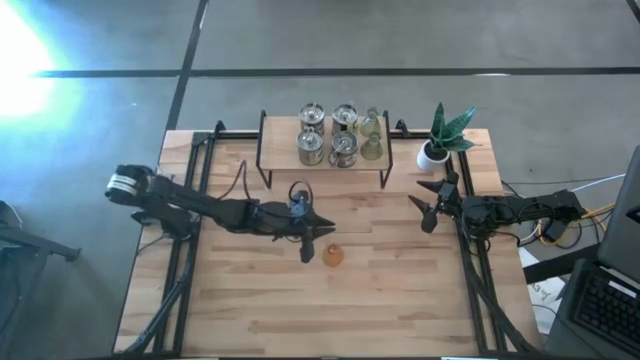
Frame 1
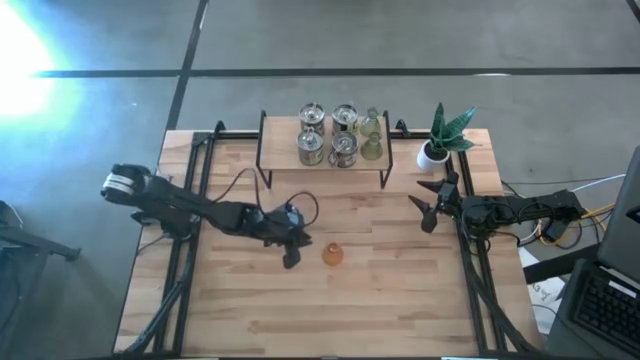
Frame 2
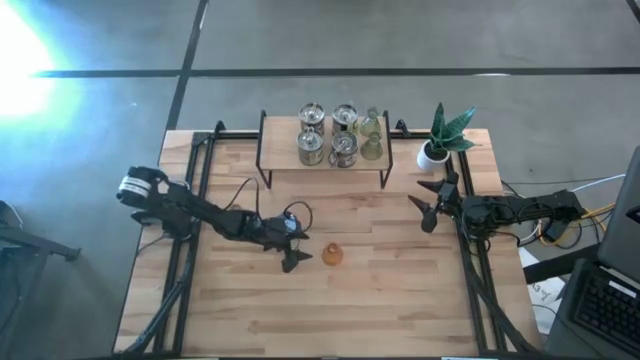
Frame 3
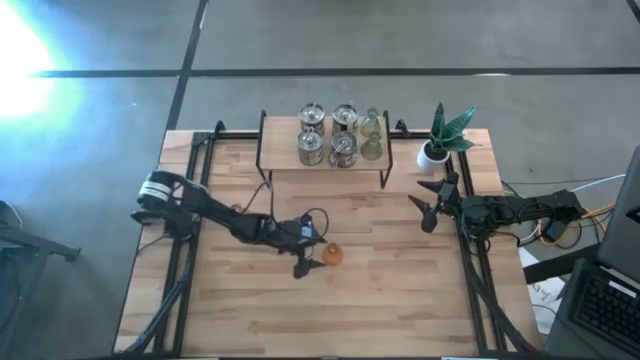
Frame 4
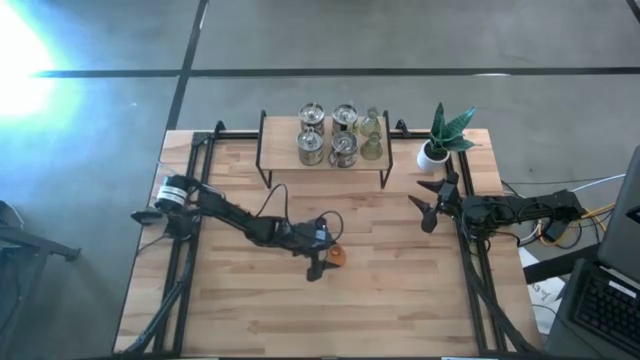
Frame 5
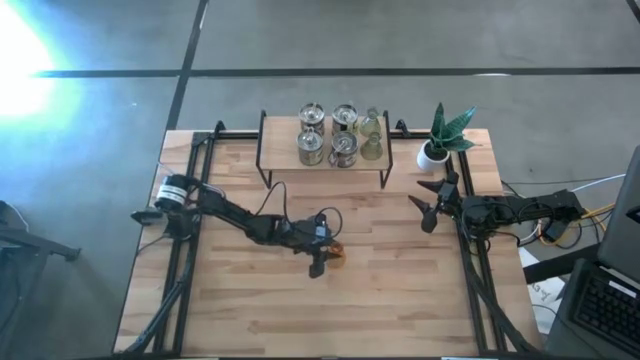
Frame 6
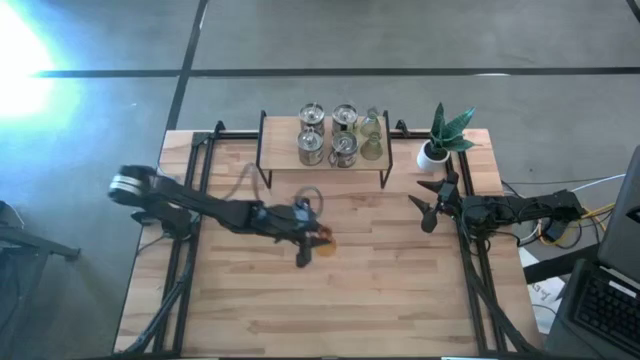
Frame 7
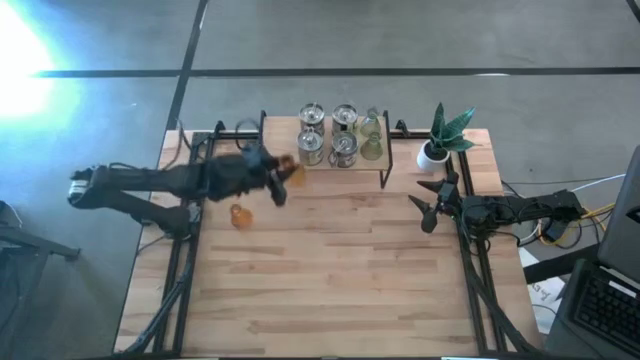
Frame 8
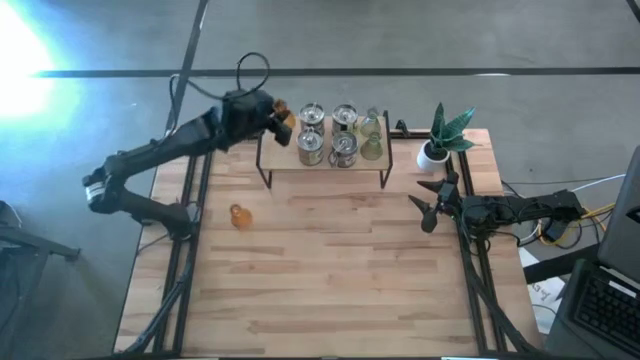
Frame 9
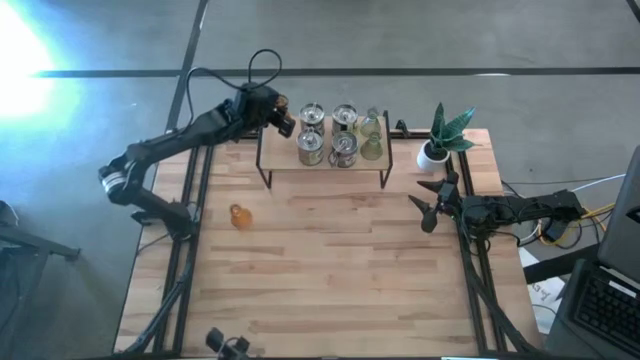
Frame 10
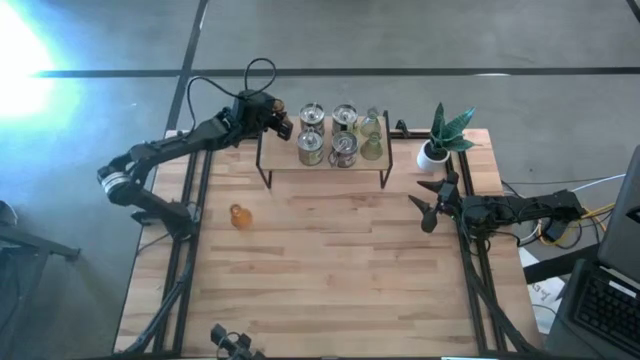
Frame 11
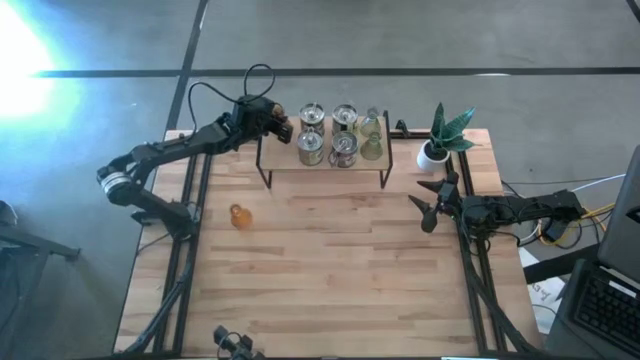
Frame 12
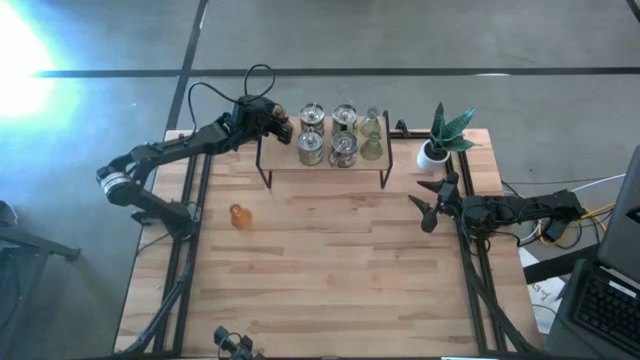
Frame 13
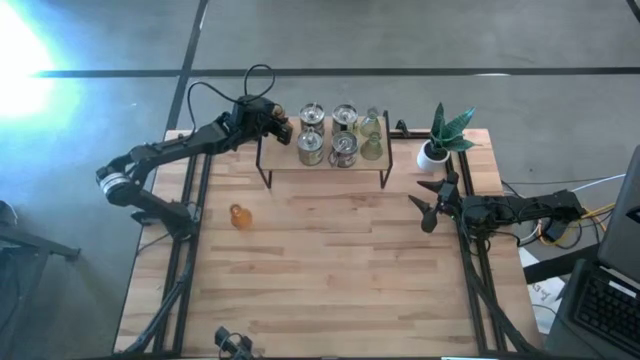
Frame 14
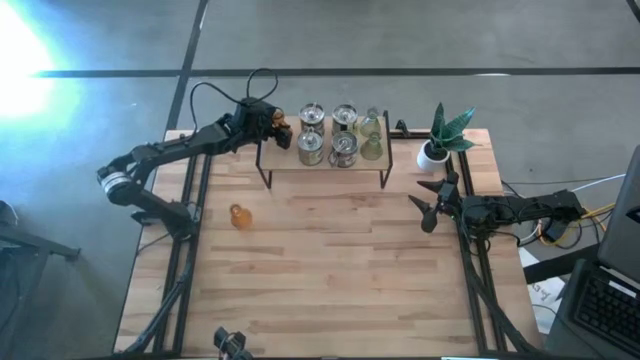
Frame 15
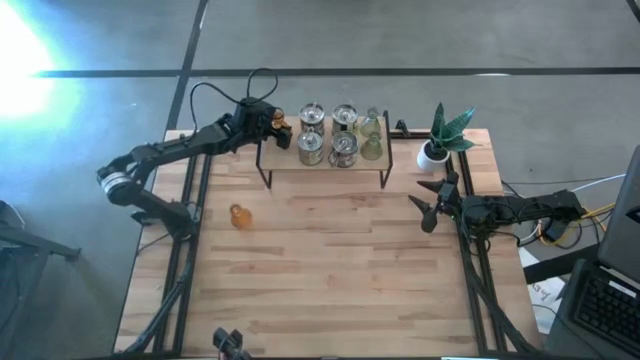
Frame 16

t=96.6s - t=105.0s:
Task: Pick & Place candle stick holders
Put the right orange candle holder on the shelf

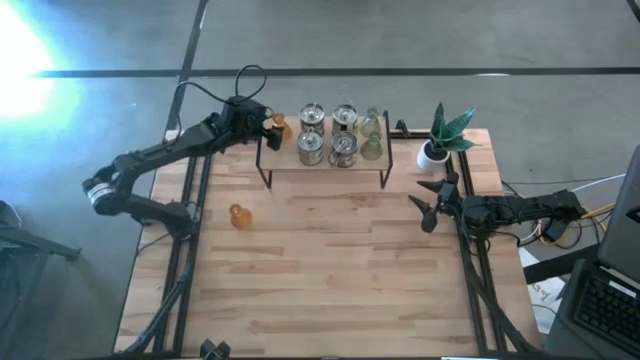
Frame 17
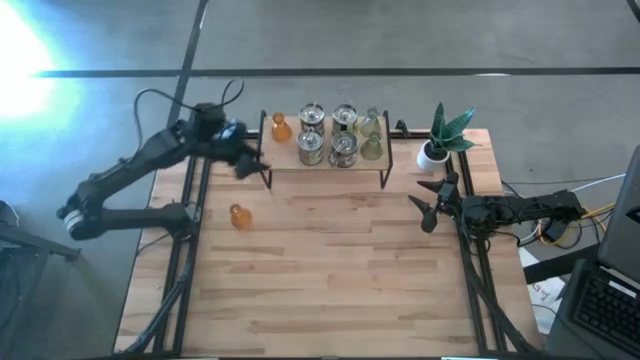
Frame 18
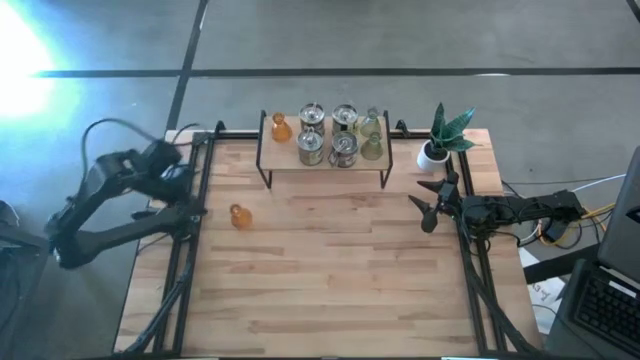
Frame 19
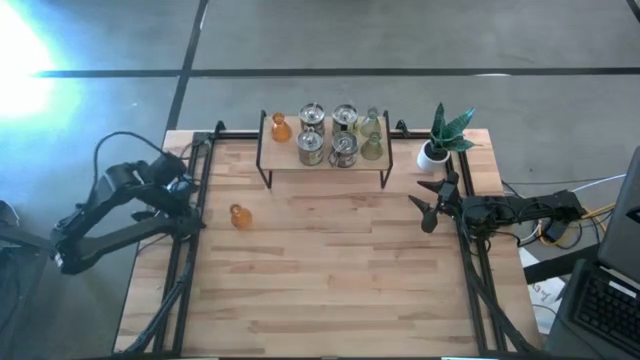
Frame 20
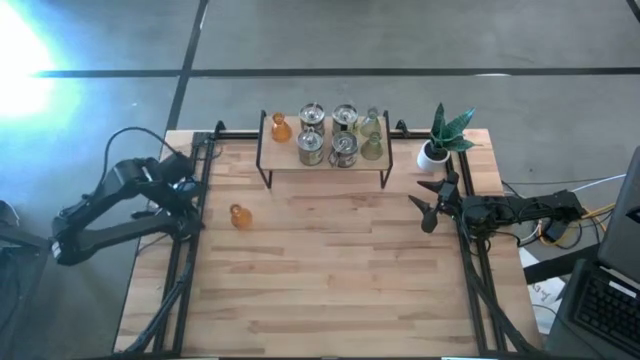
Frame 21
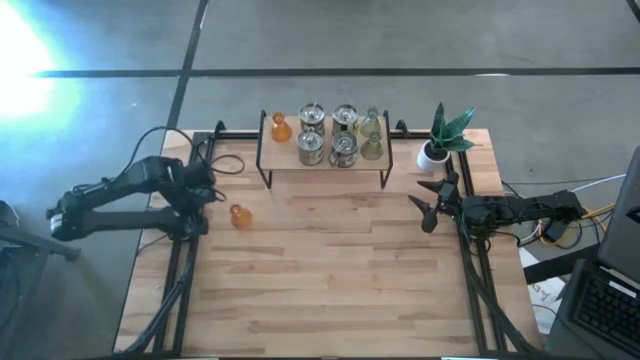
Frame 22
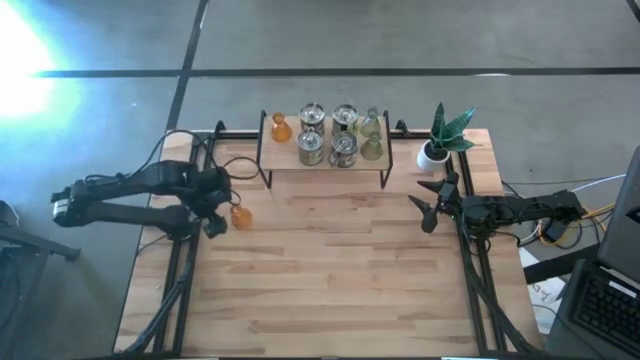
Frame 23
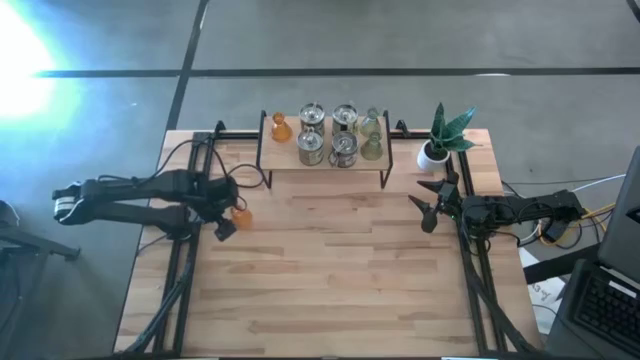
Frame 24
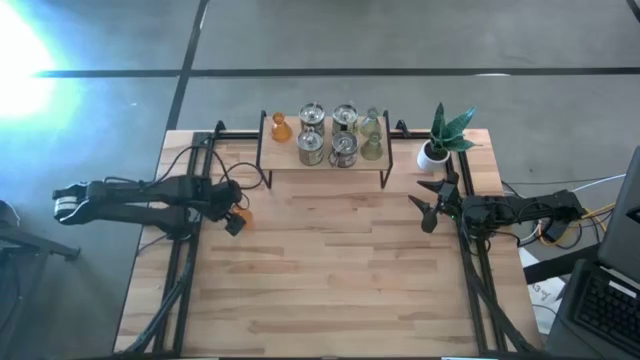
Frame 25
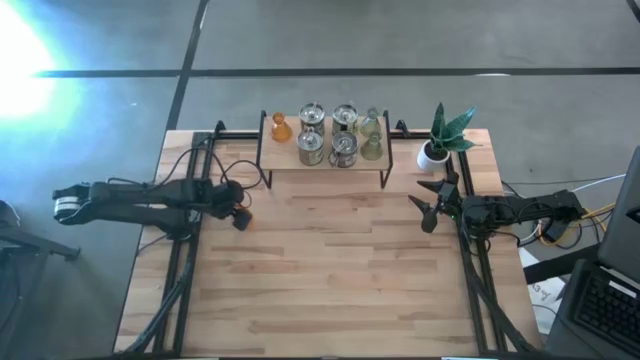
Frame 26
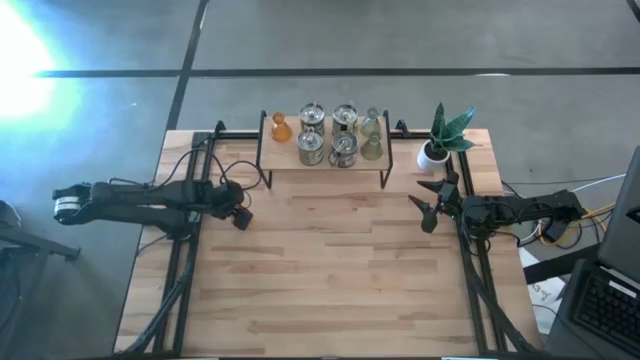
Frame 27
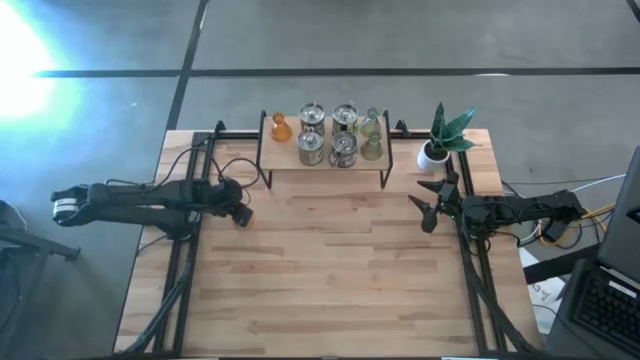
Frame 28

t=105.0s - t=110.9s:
Align the orange candle holder with the other orange candle holder on the shelf

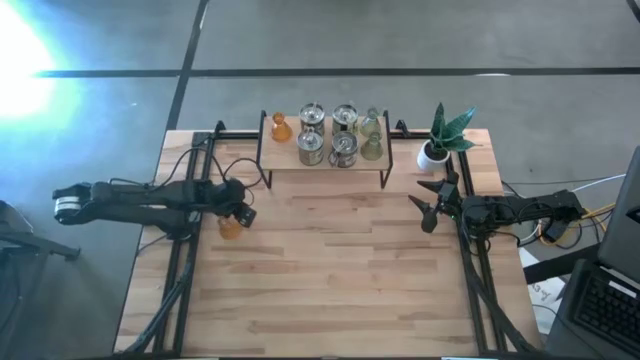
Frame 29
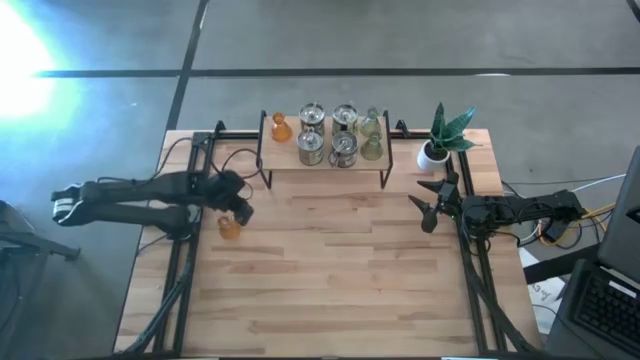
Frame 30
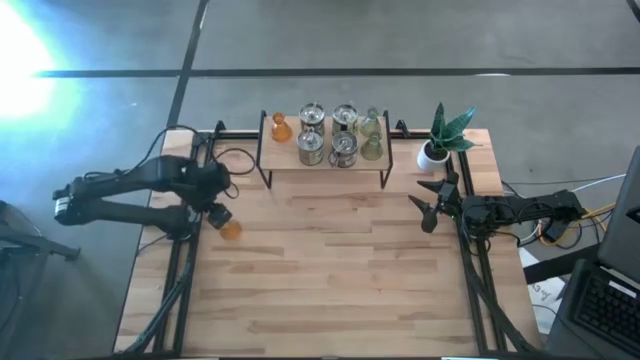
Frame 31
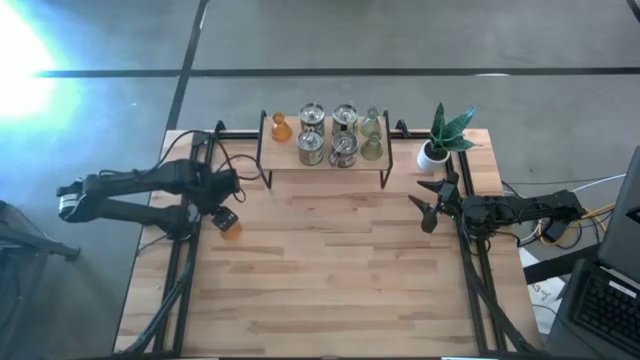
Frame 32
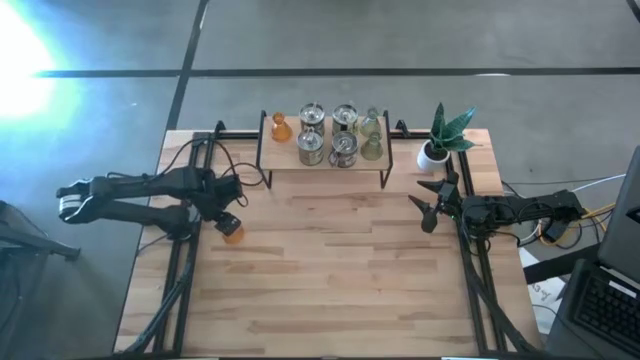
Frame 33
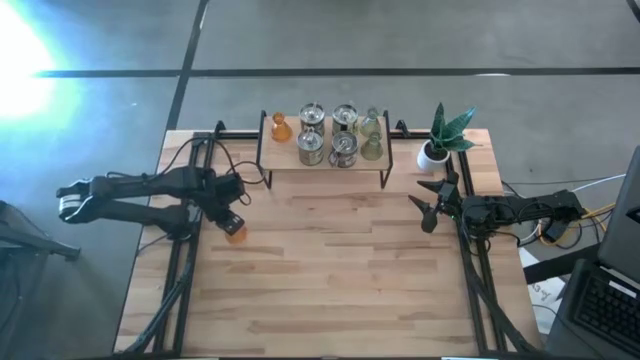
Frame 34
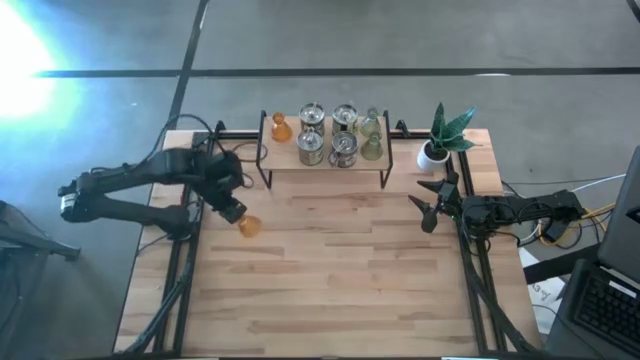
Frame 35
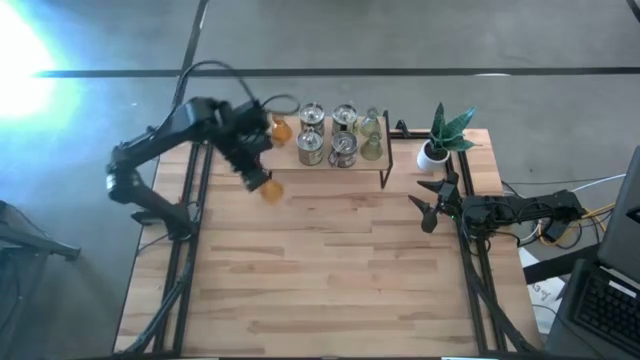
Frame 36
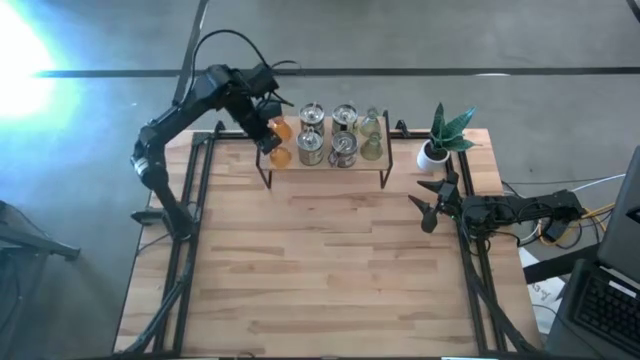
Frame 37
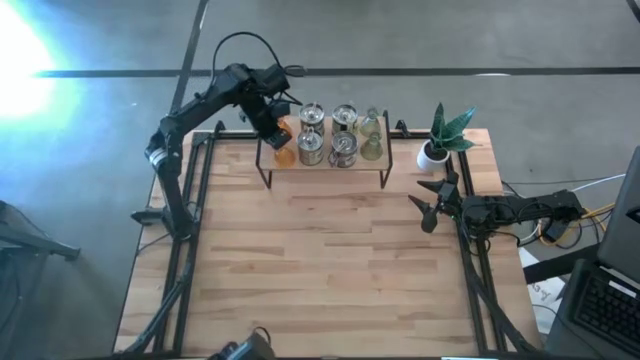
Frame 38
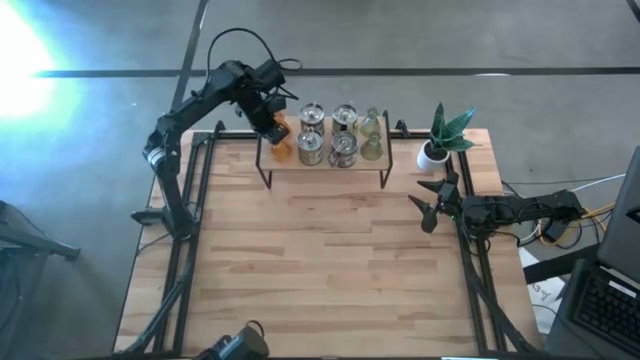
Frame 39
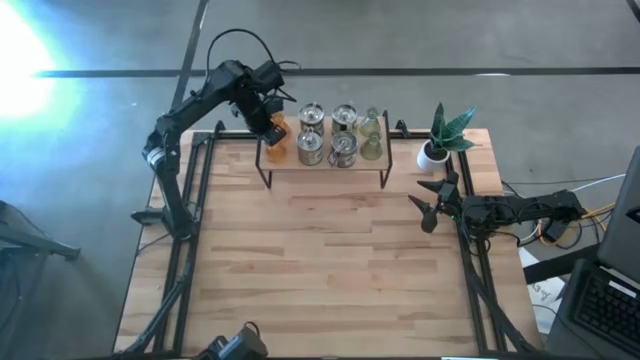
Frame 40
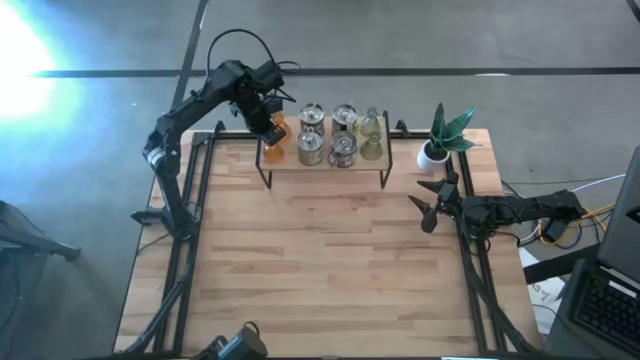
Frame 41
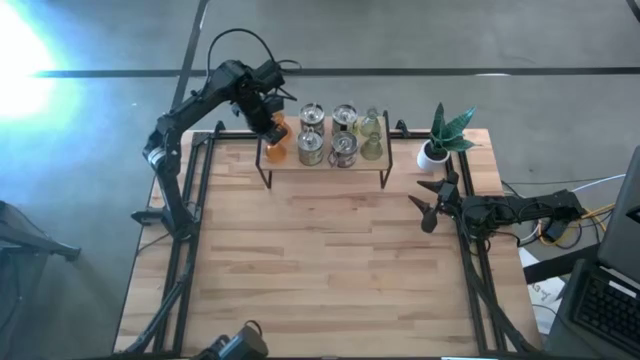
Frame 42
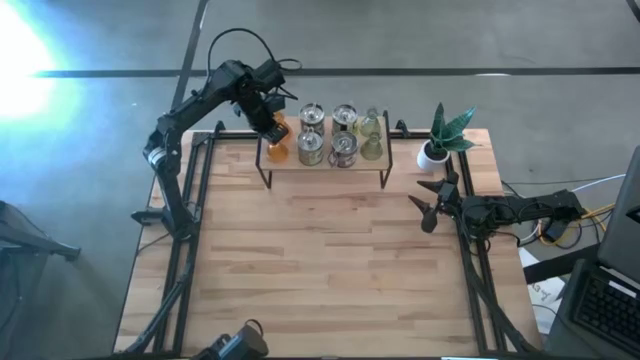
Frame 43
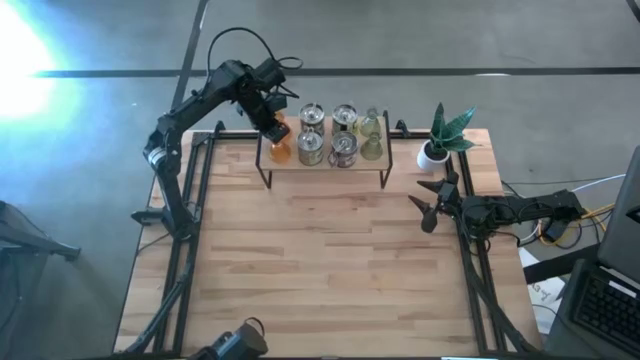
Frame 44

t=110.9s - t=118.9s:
Align the orange candle holder with the other orange candle holder on the shelf
